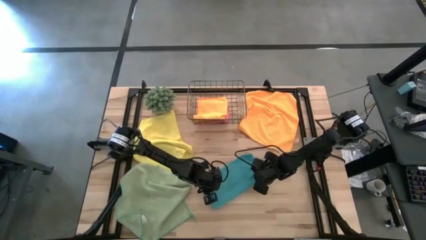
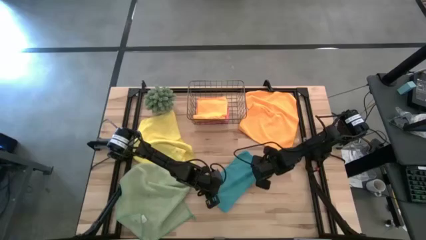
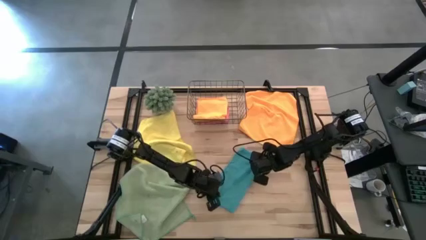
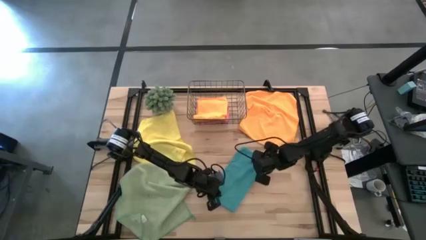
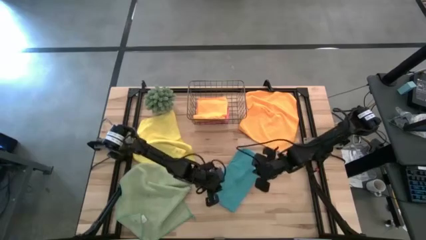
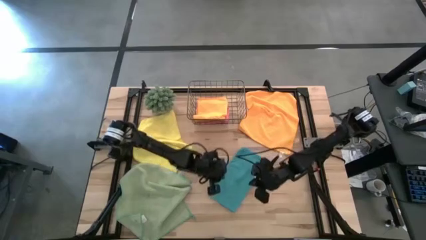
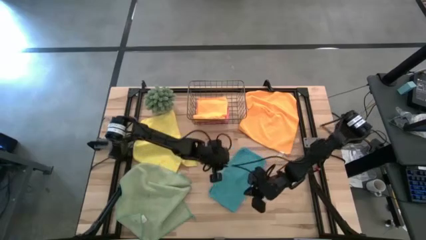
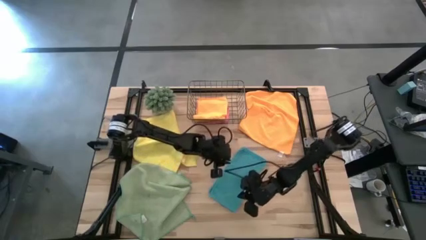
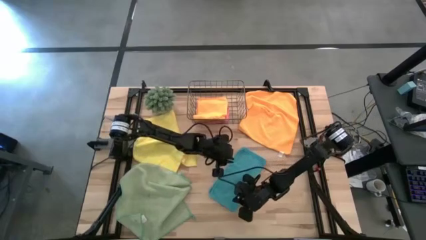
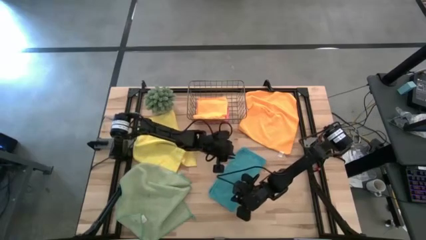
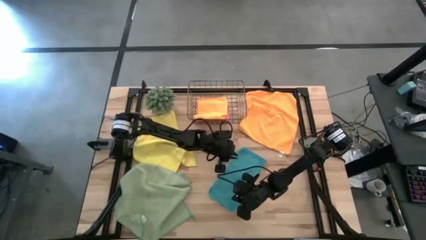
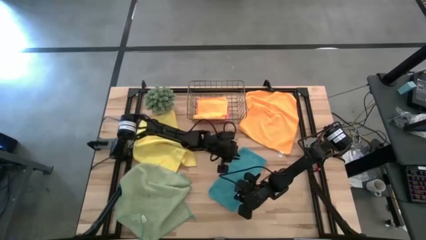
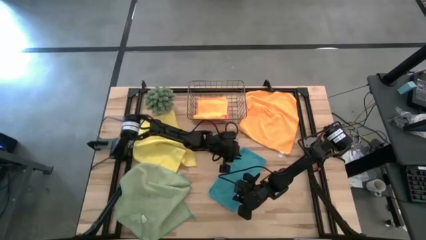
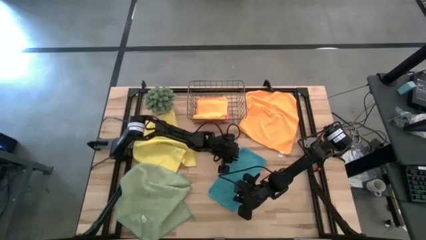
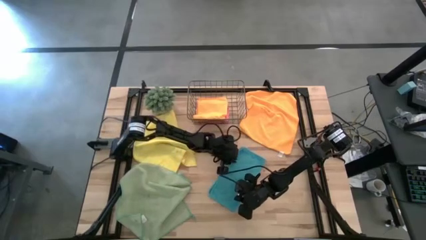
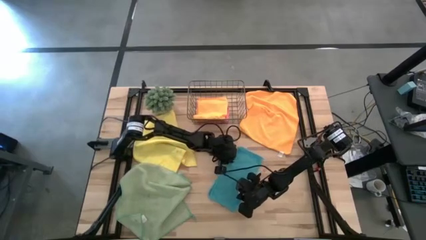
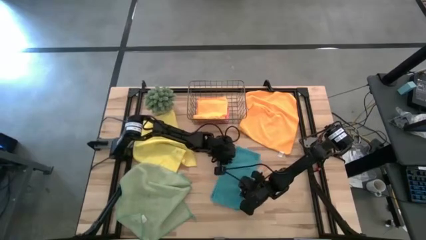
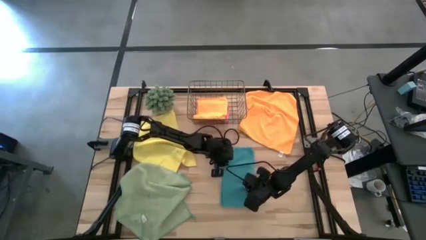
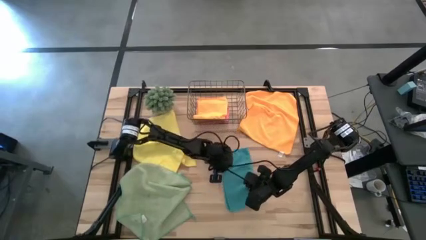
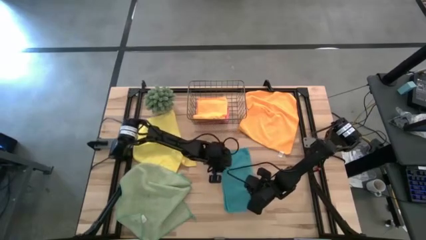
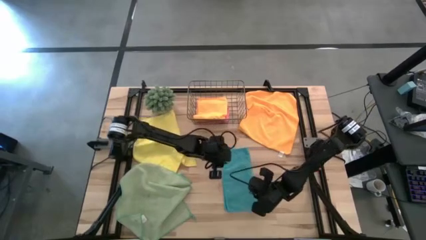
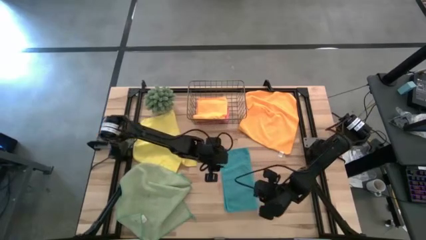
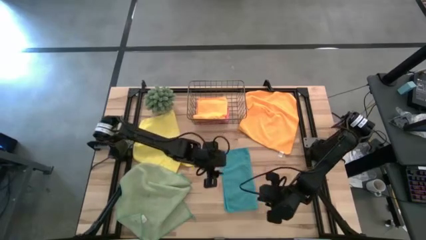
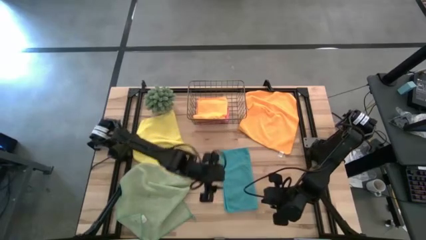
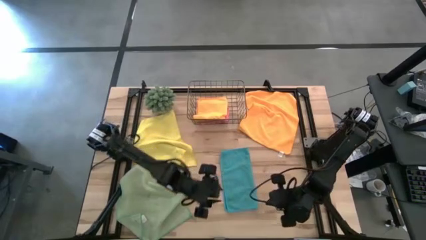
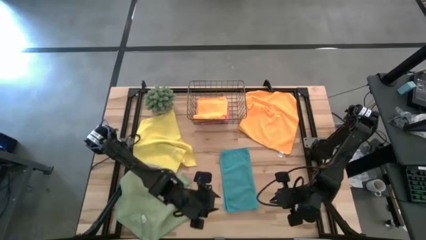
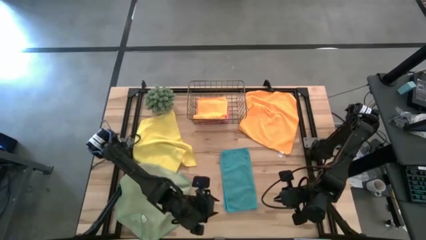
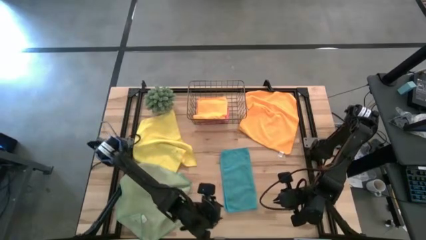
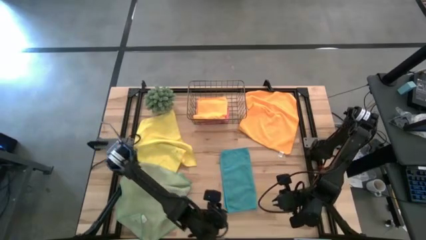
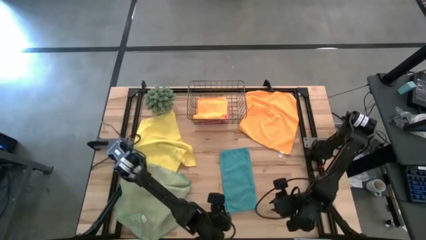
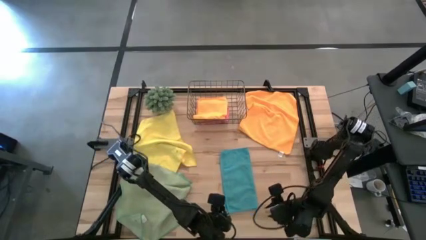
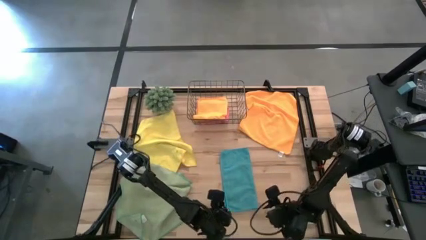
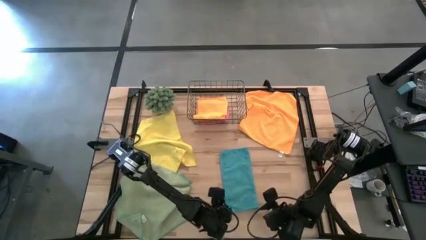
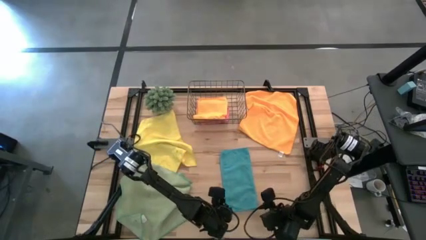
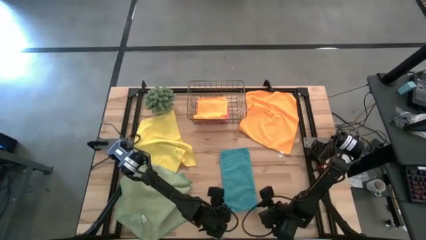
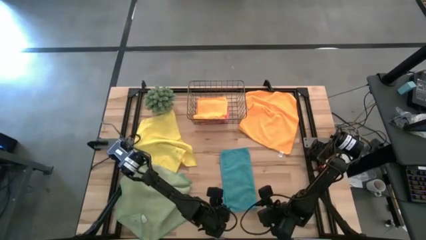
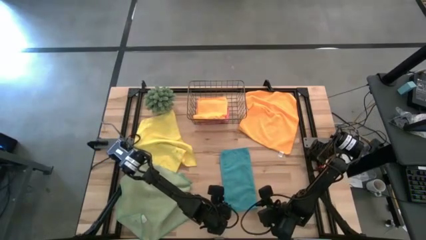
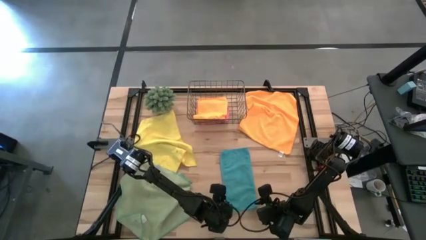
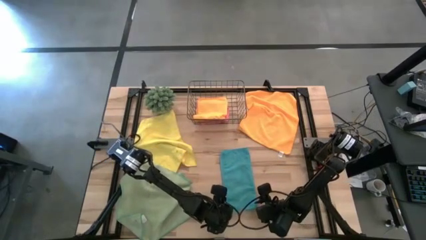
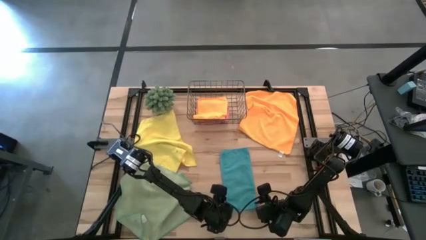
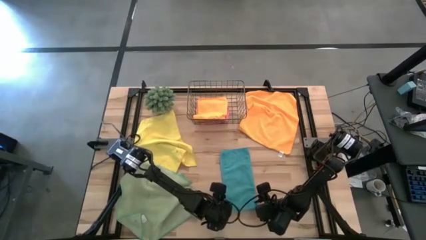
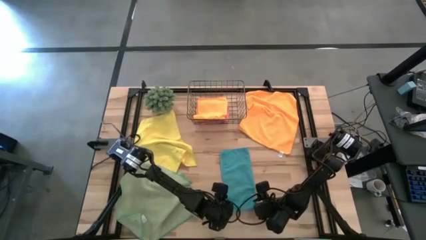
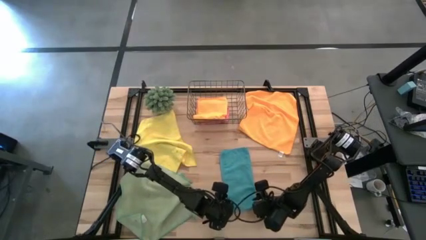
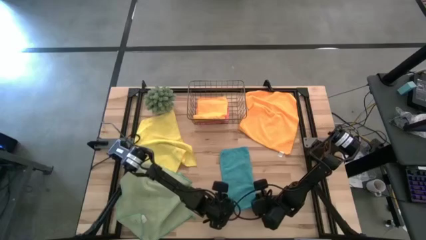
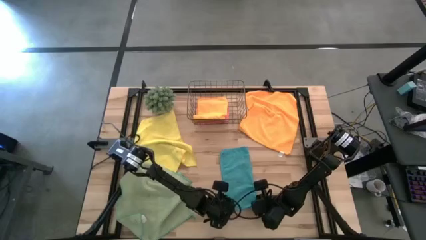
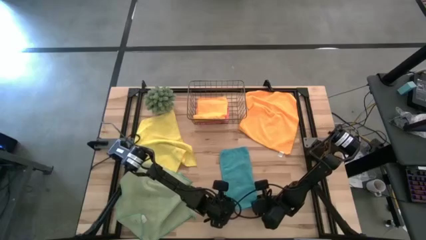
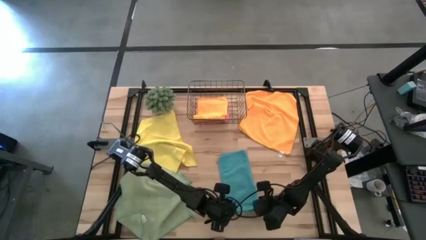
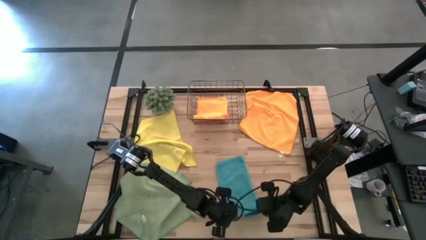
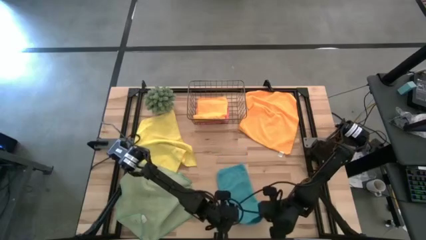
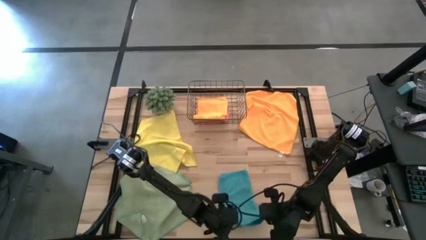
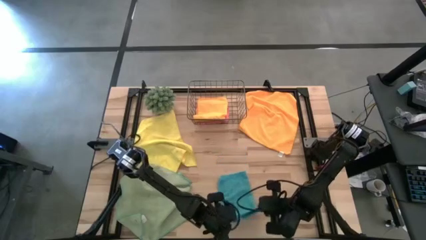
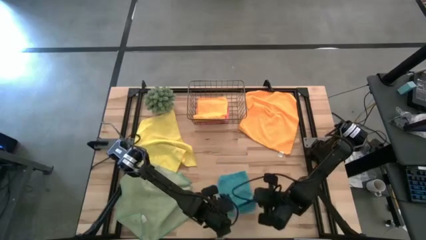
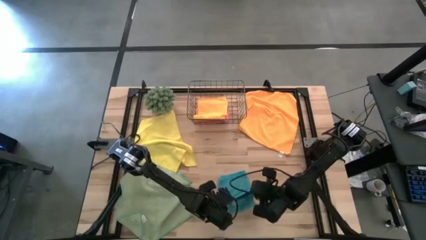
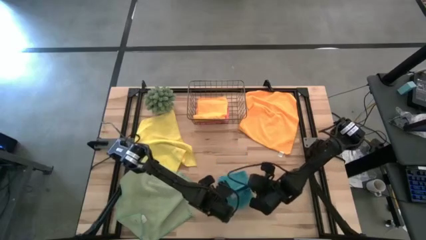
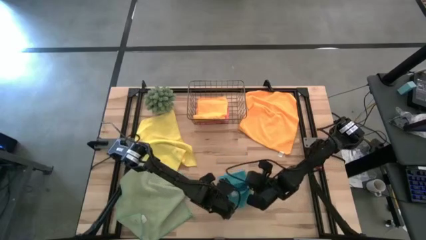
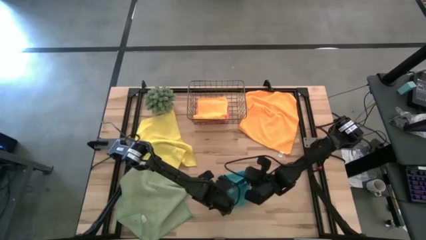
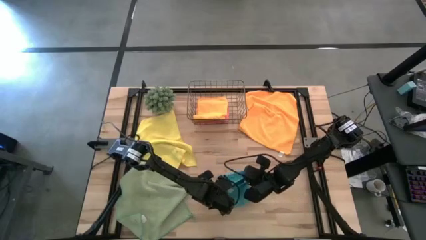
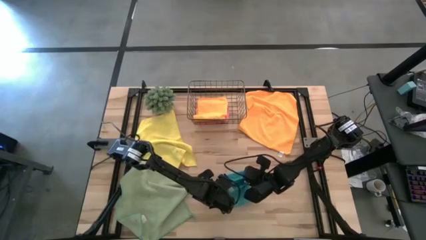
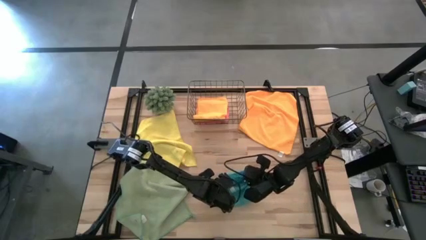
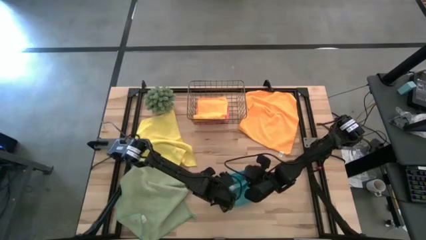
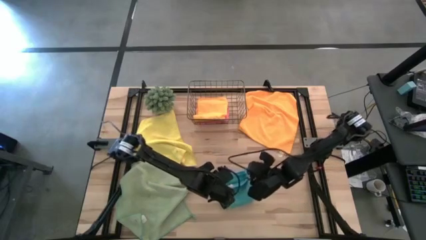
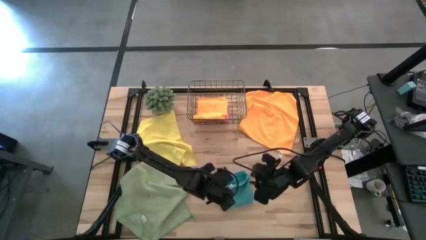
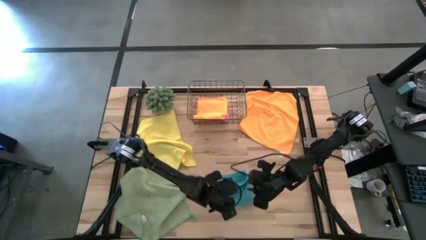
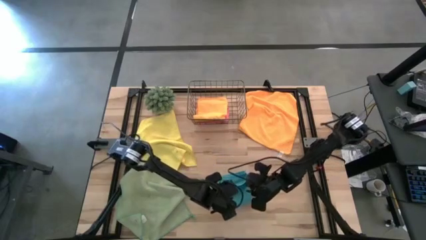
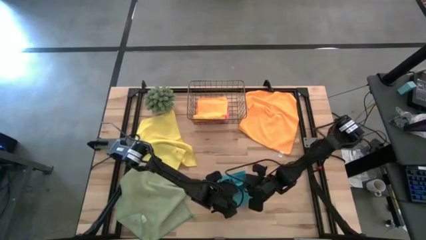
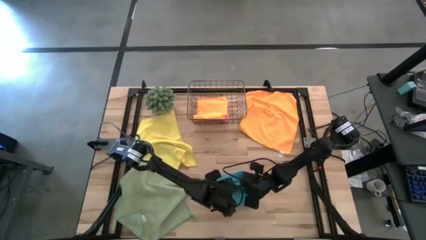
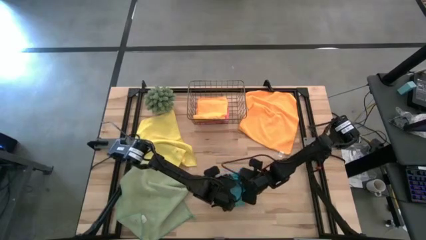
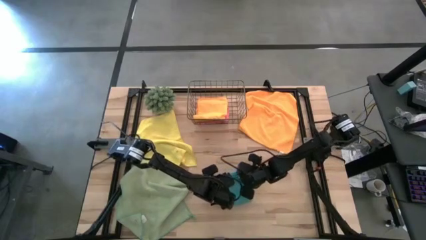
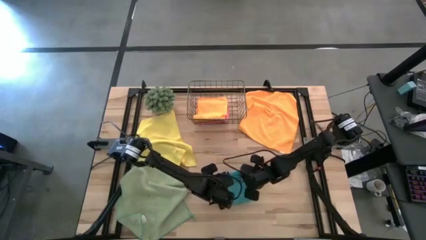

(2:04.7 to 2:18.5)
Task: Fold microfiber towels
Fold the blue microfiber towel
